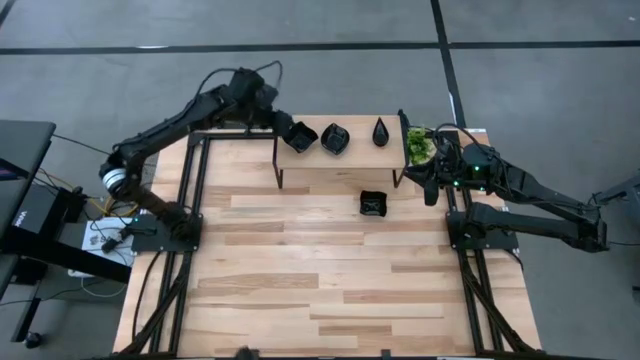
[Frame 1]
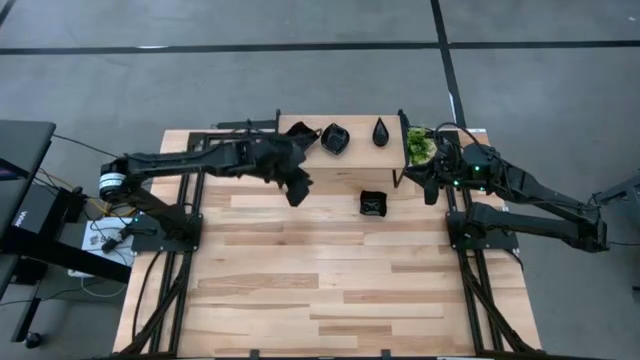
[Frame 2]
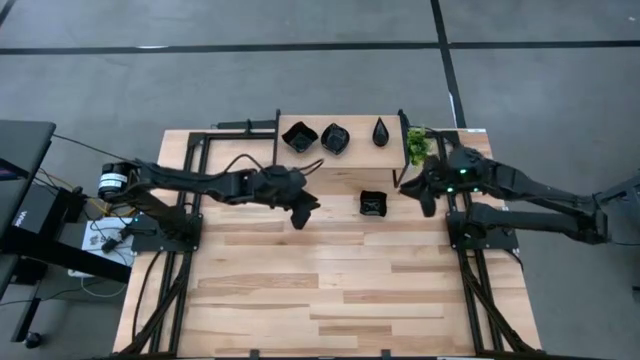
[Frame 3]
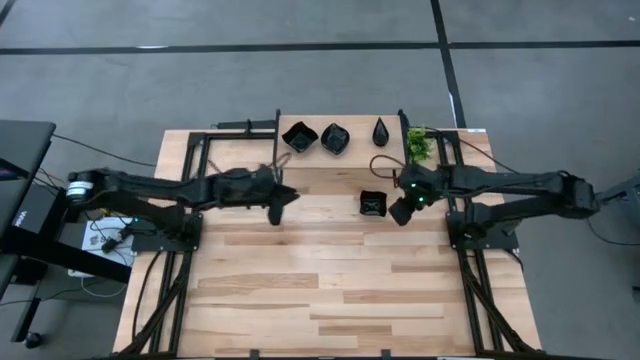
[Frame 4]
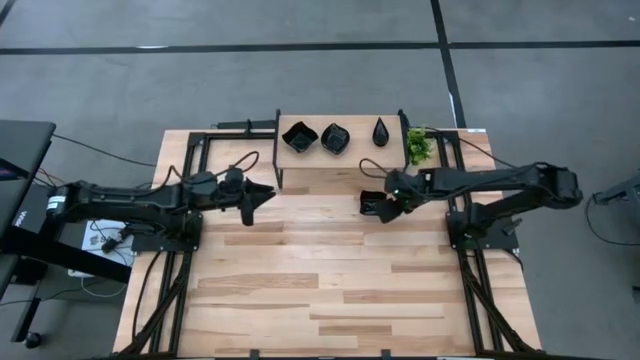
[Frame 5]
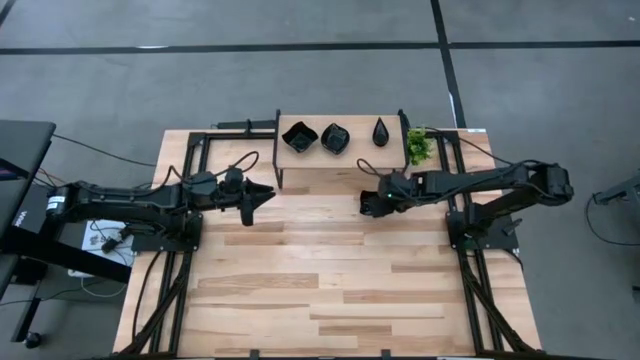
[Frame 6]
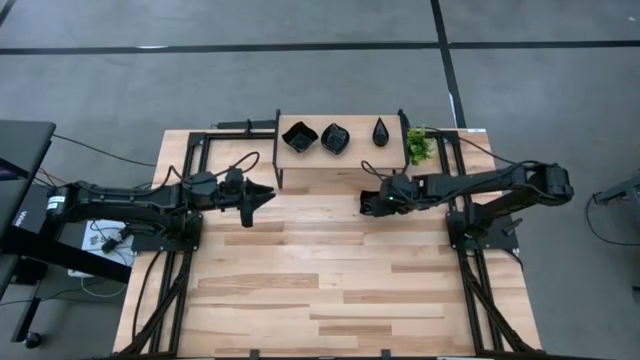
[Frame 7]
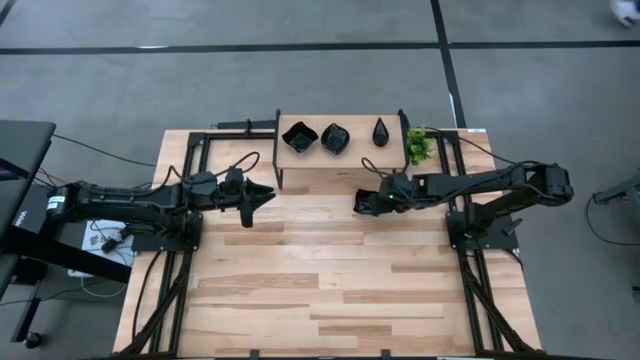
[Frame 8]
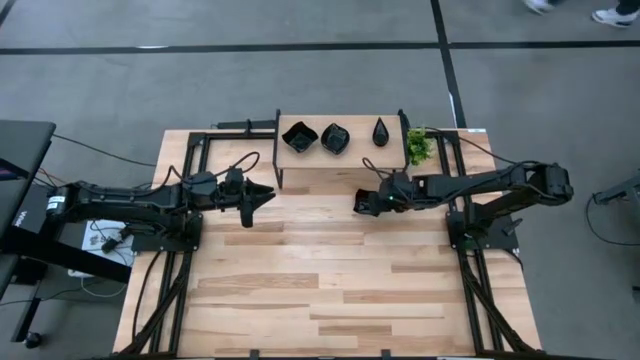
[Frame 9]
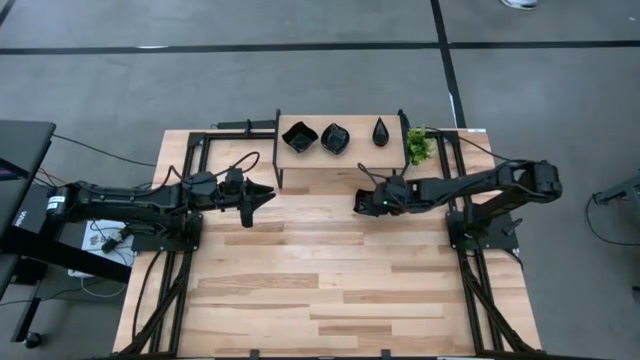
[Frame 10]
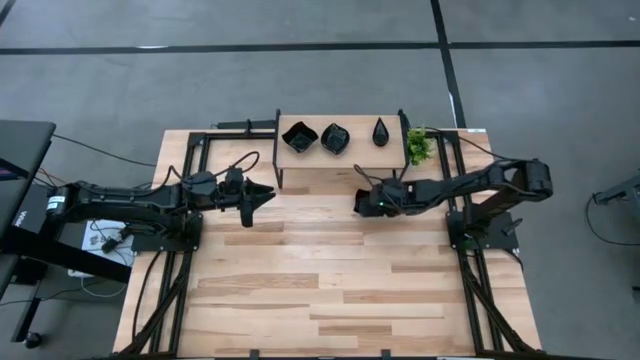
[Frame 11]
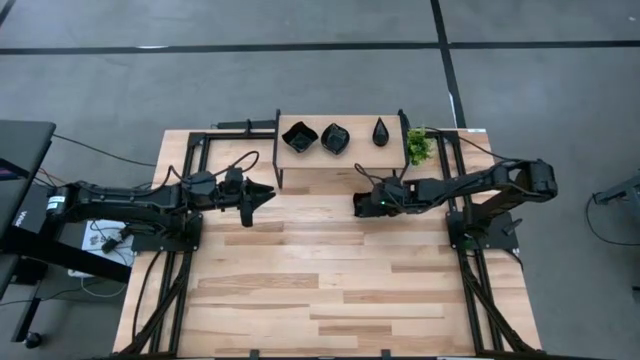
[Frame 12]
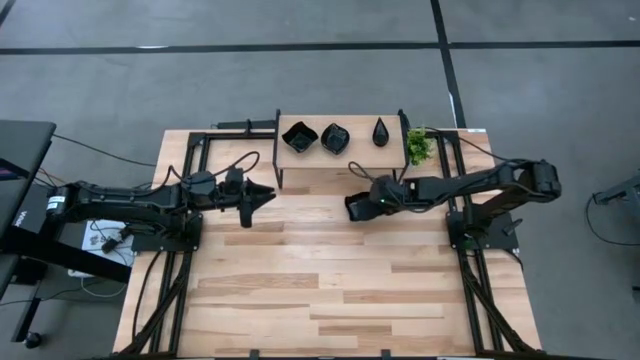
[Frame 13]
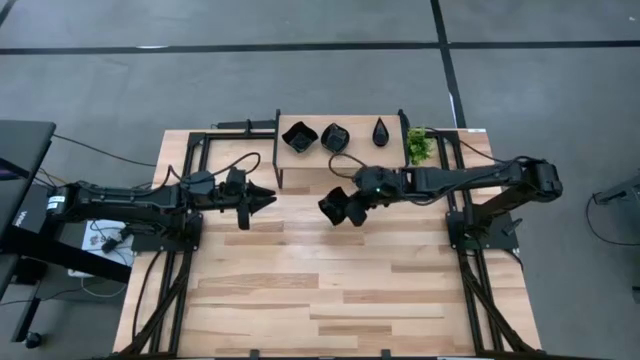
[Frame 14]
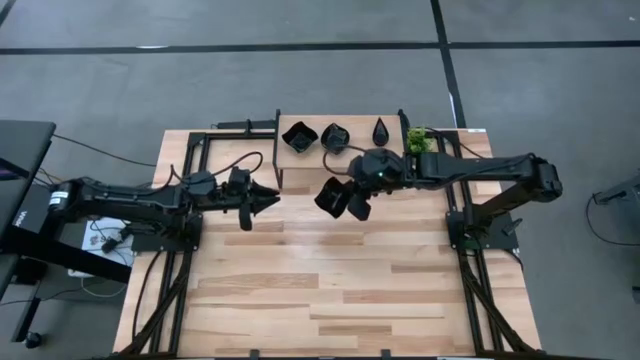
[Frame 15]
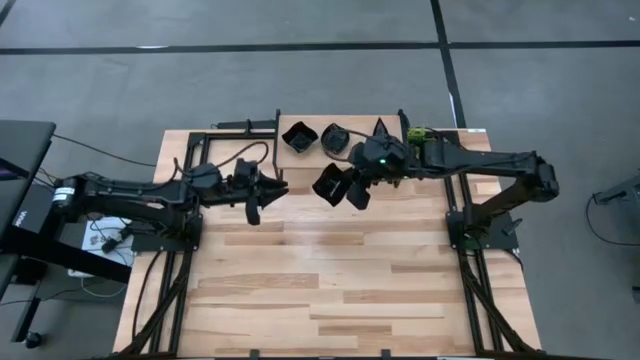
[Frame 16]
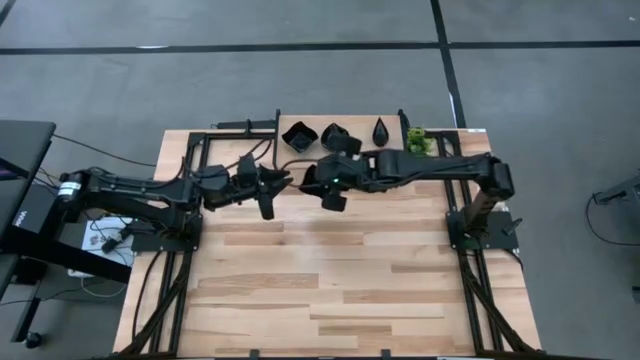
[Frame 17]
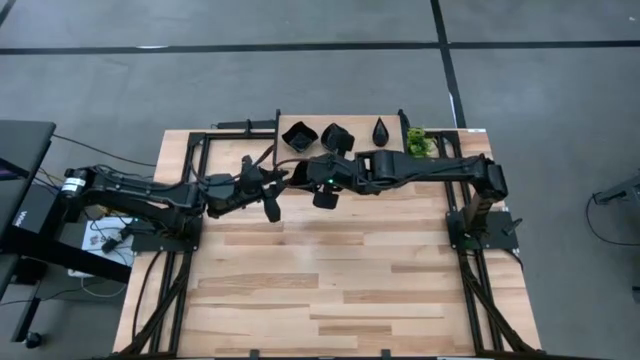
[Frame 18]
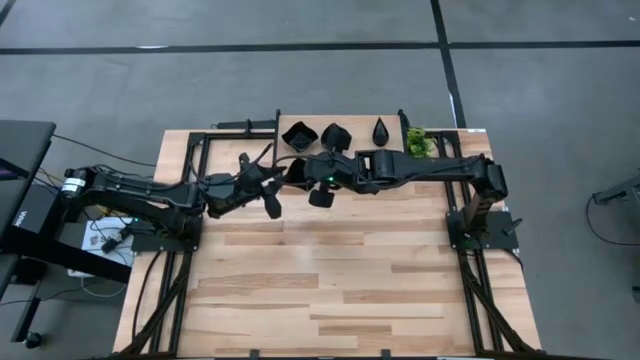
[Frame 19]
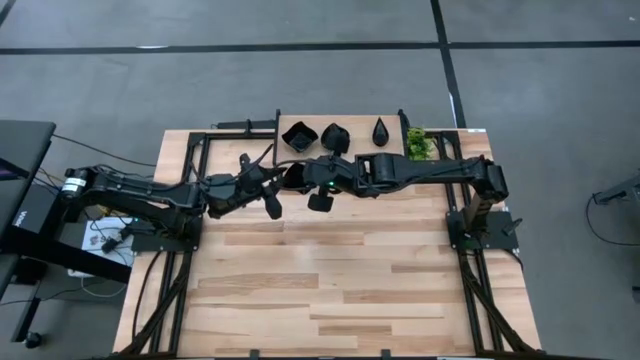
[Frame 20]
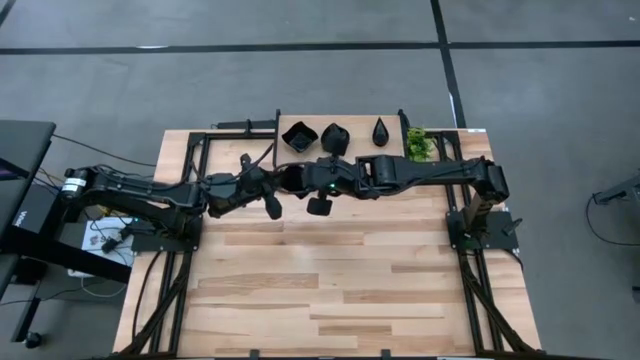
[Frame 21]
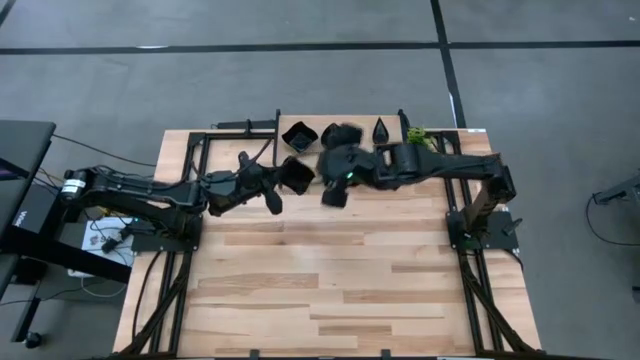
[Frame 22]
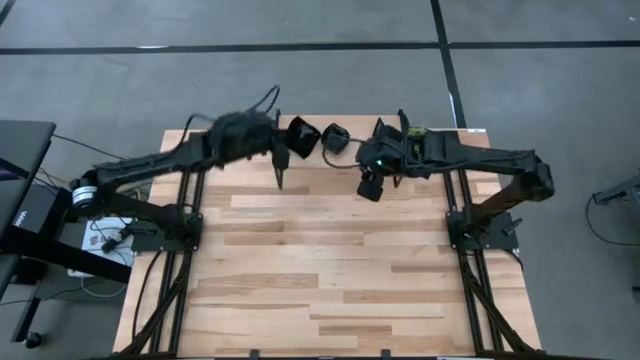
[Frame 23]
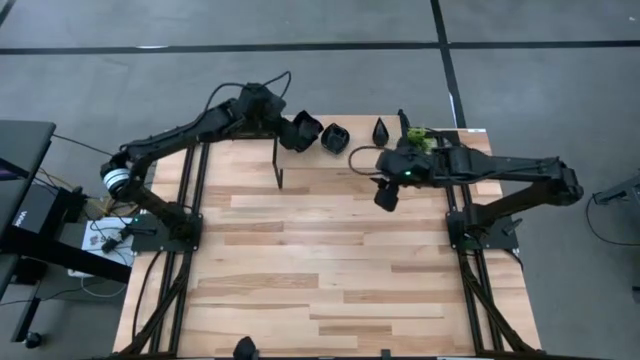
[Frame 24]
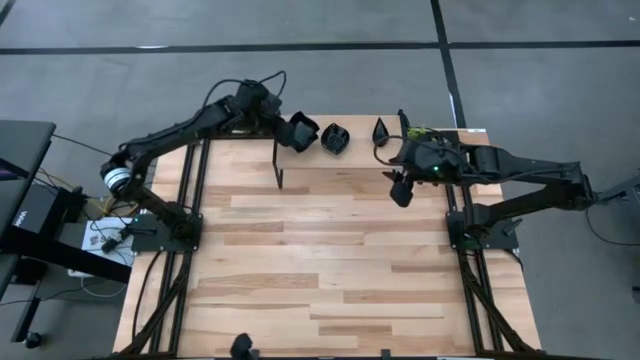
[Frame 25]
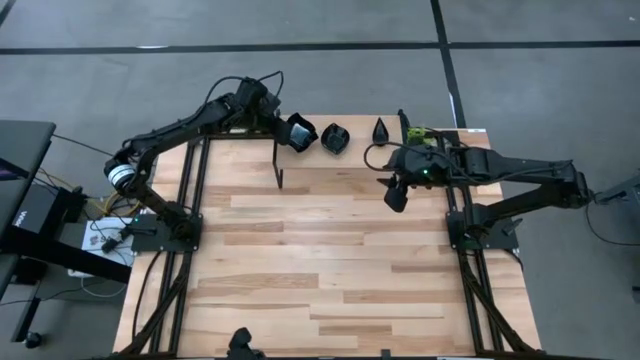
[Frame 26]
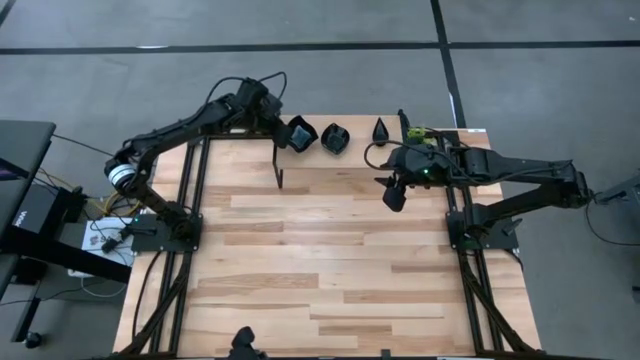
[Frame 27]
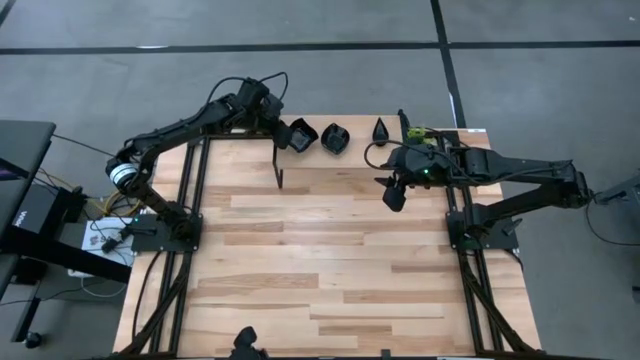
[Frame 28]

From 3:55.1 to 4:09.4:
Task: Pick & Place Mini shaped plates
Stack the distorted square plate on top of the distorted square plates on the shelf

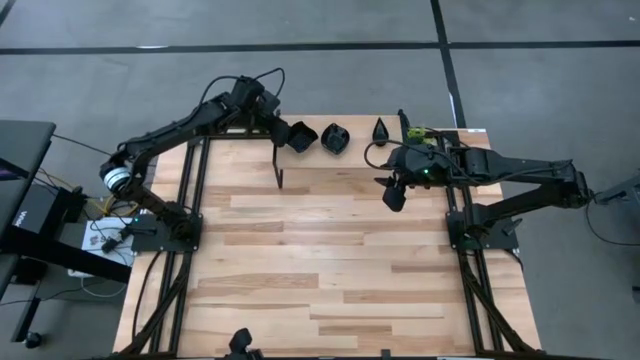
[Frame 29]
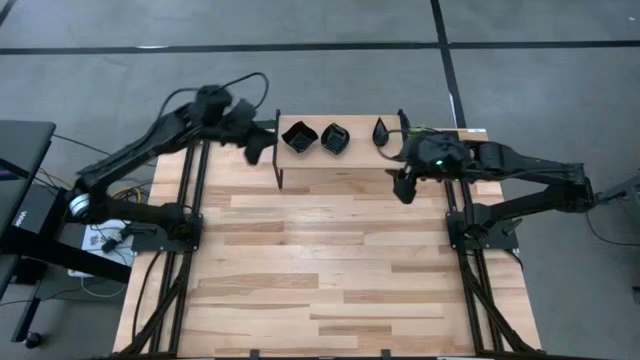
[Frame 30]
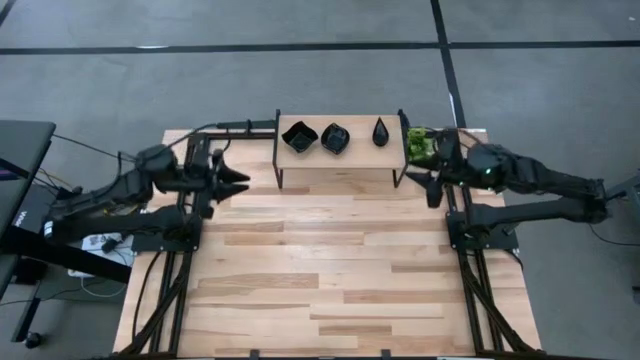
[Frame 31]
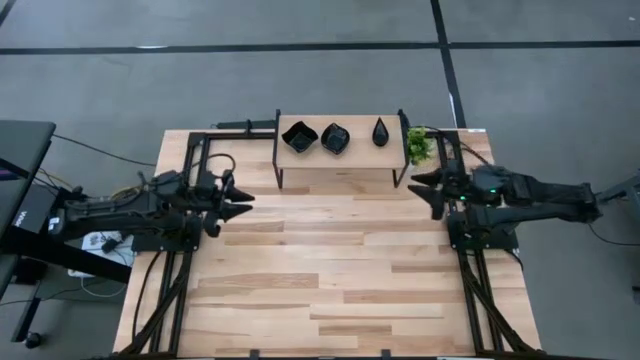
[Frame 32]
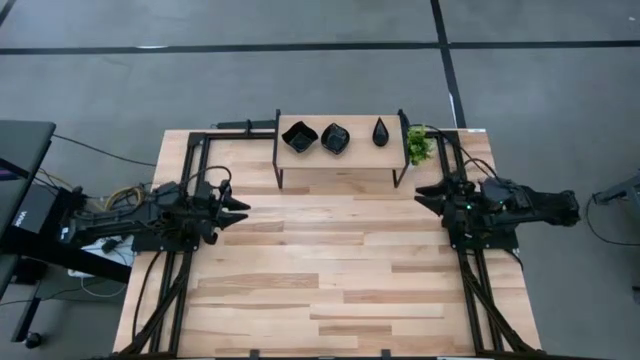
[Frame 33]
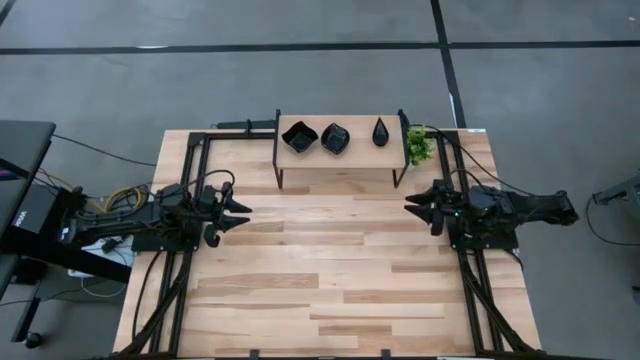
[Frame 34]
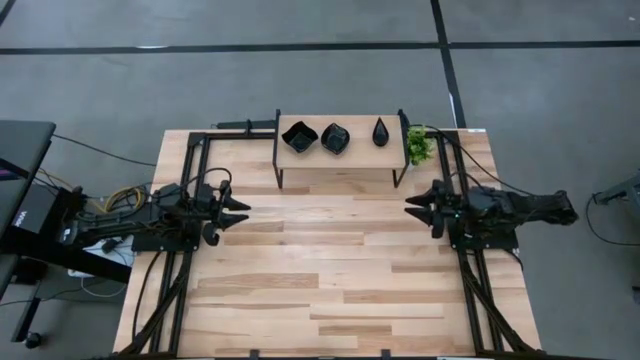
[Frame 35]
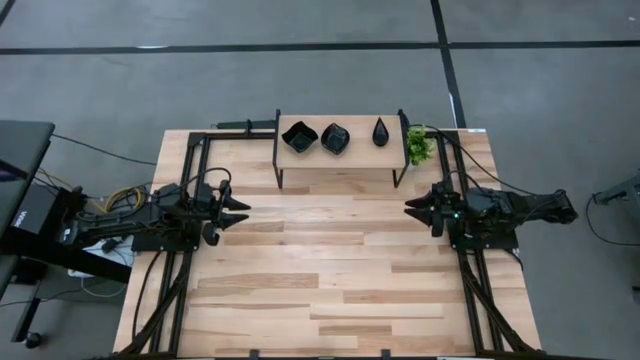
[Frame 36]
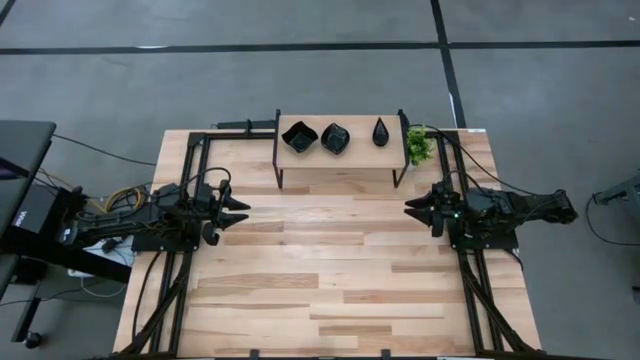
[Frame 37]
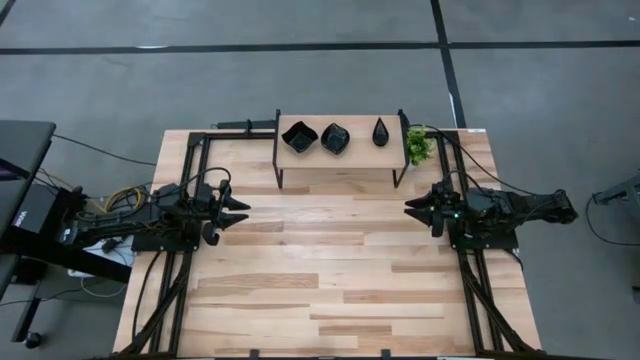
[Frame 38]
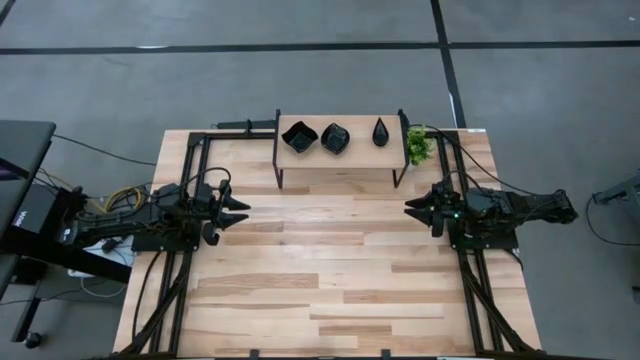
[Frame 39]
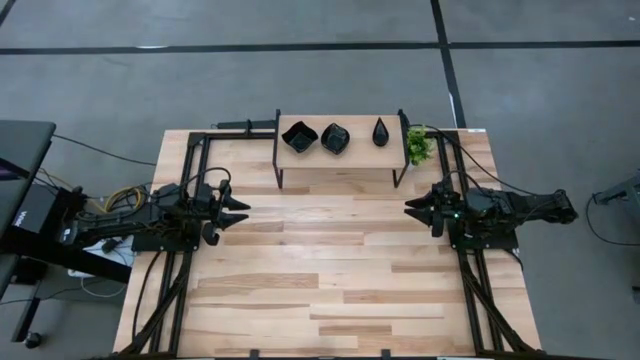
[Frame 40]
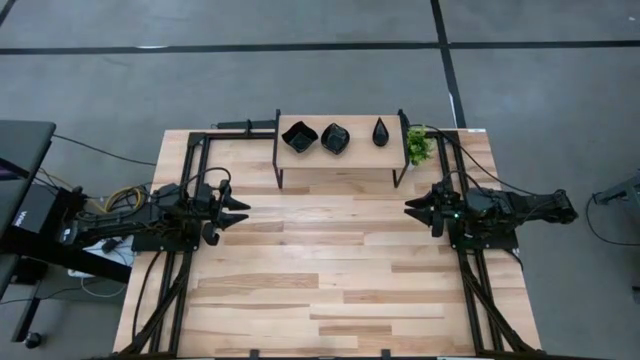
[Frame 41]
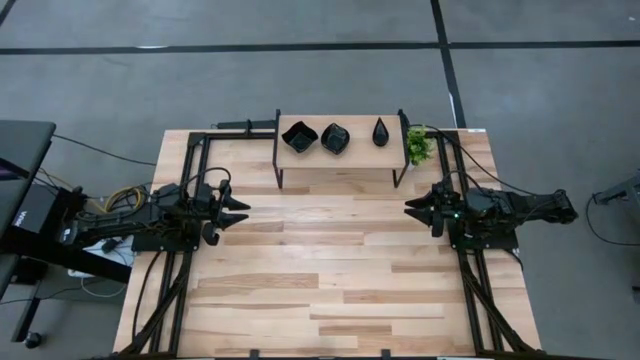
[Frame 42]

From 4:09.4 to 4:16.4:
Return to Home Position
